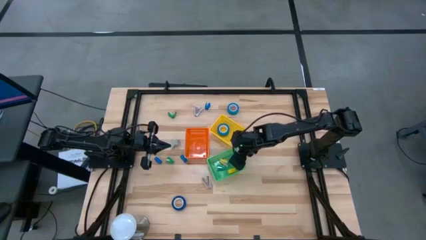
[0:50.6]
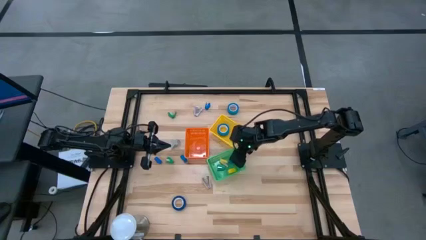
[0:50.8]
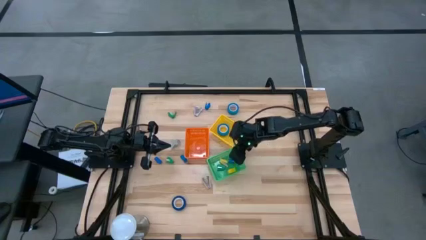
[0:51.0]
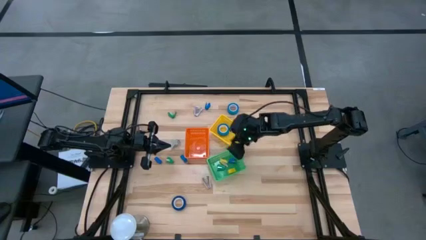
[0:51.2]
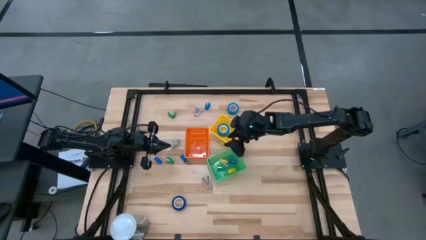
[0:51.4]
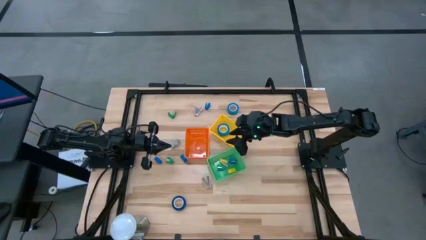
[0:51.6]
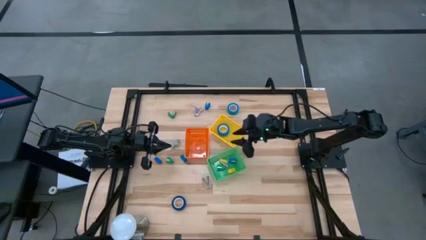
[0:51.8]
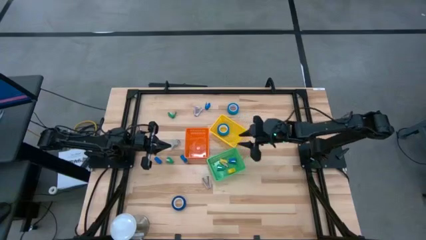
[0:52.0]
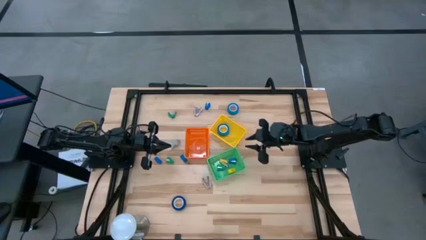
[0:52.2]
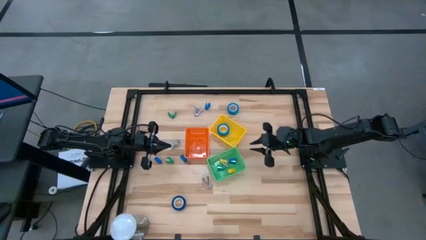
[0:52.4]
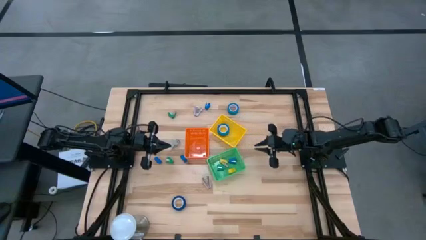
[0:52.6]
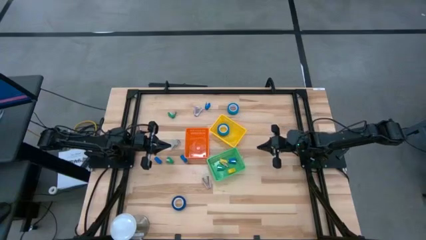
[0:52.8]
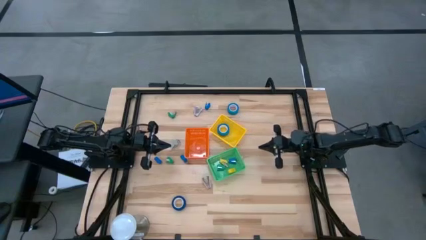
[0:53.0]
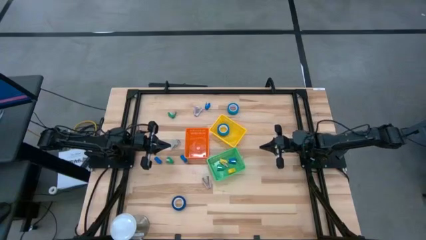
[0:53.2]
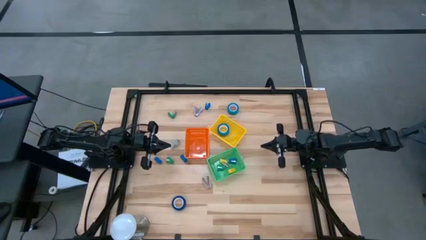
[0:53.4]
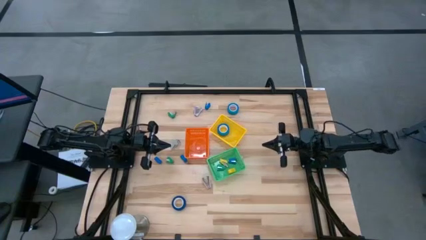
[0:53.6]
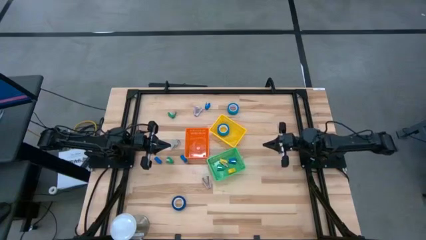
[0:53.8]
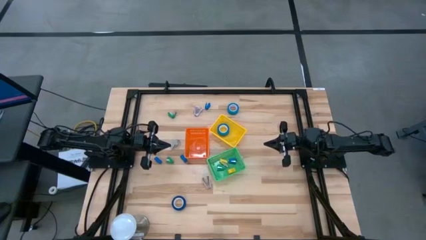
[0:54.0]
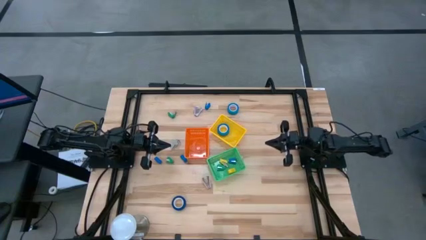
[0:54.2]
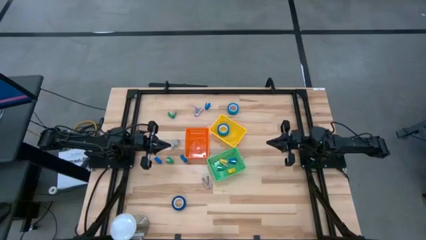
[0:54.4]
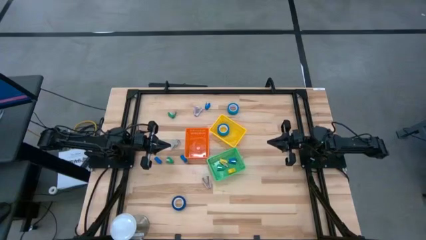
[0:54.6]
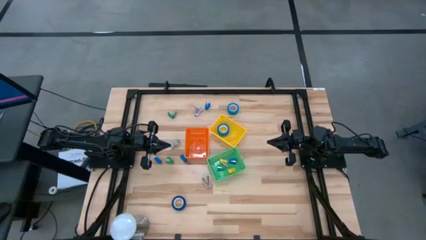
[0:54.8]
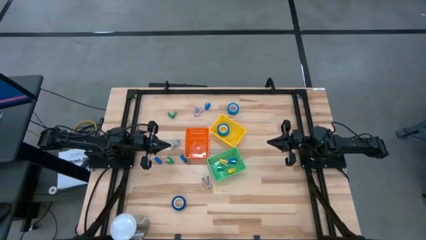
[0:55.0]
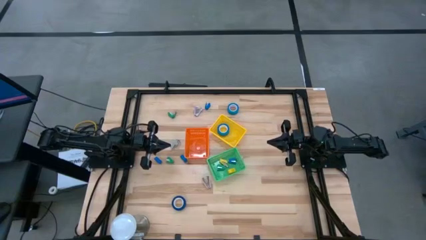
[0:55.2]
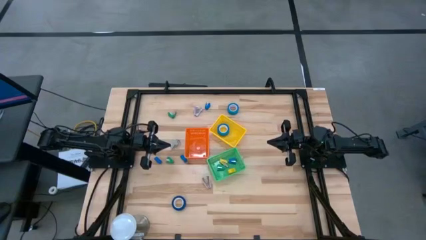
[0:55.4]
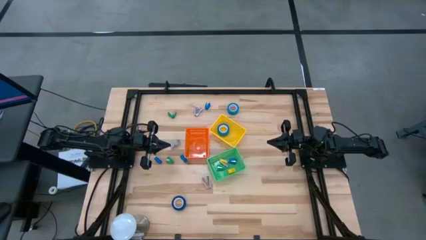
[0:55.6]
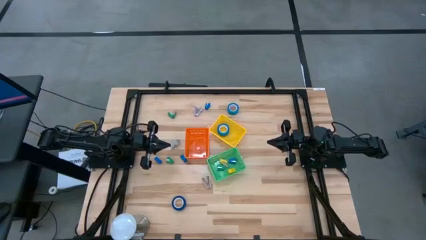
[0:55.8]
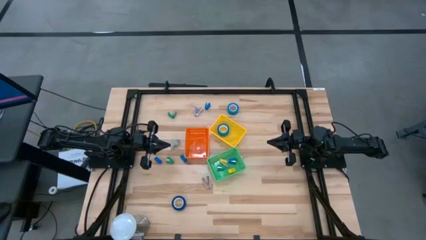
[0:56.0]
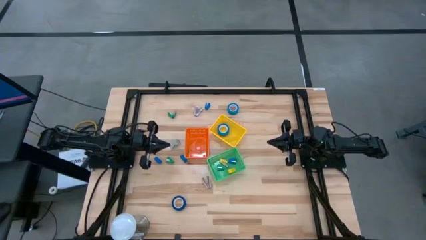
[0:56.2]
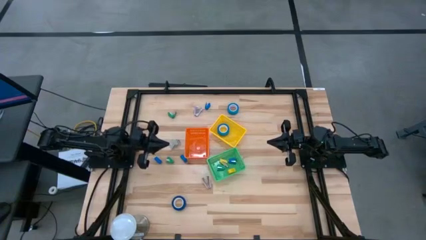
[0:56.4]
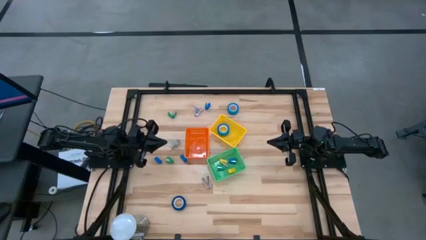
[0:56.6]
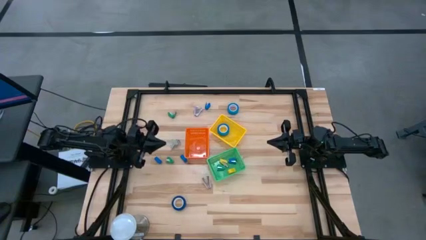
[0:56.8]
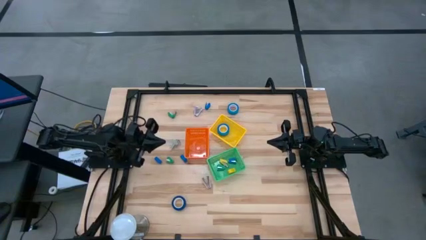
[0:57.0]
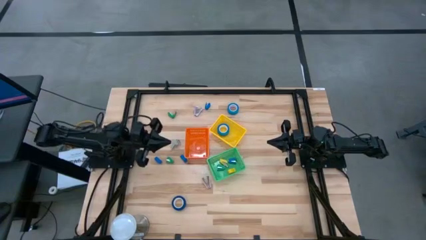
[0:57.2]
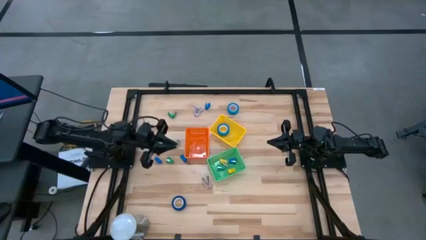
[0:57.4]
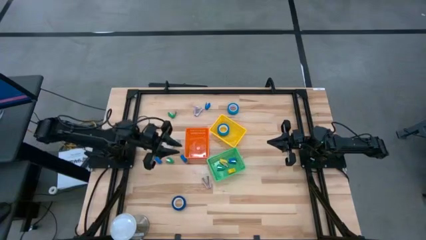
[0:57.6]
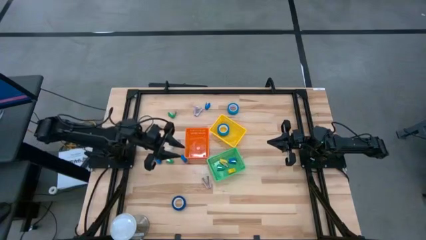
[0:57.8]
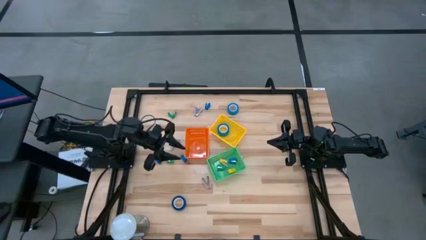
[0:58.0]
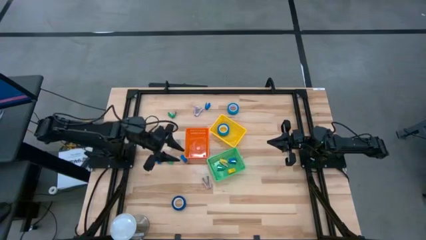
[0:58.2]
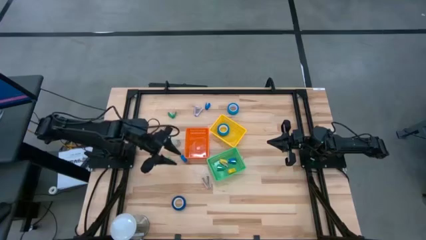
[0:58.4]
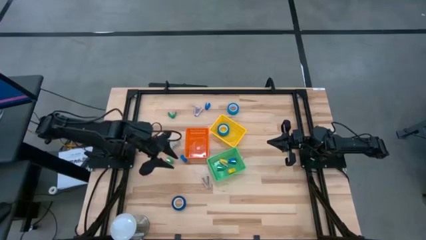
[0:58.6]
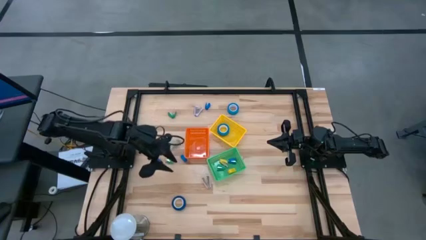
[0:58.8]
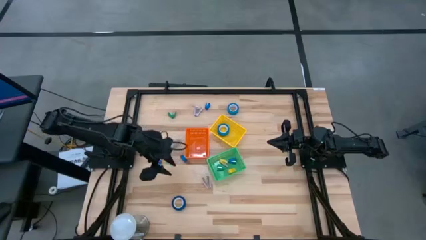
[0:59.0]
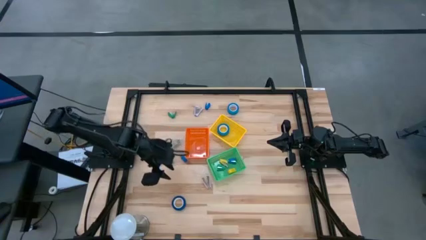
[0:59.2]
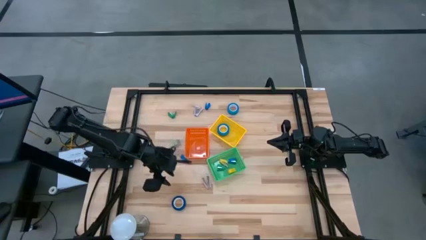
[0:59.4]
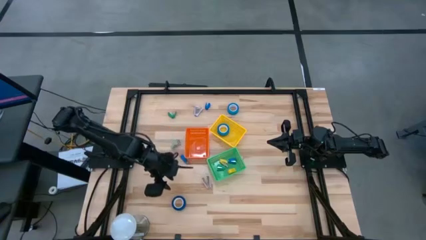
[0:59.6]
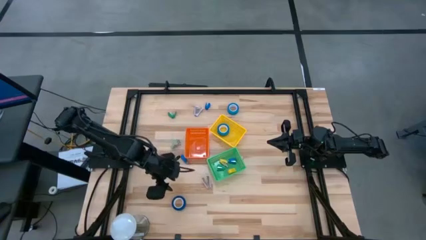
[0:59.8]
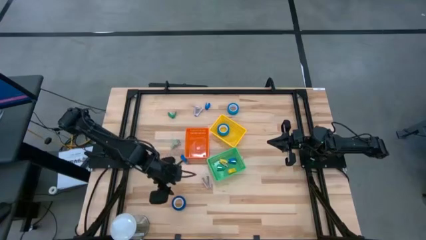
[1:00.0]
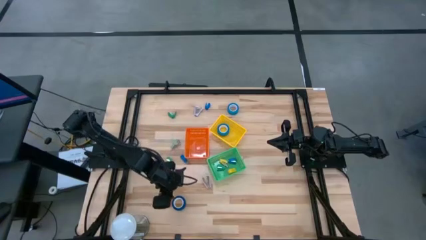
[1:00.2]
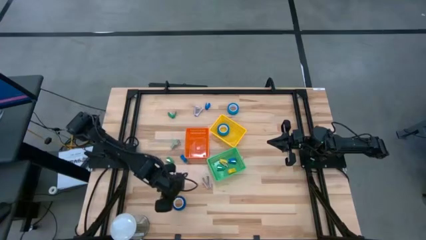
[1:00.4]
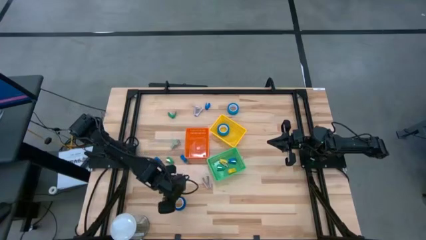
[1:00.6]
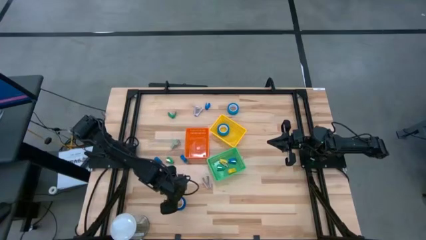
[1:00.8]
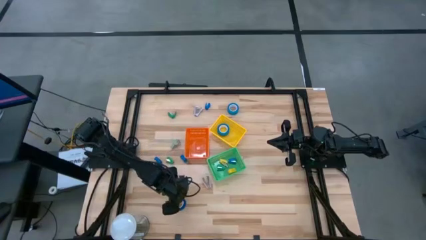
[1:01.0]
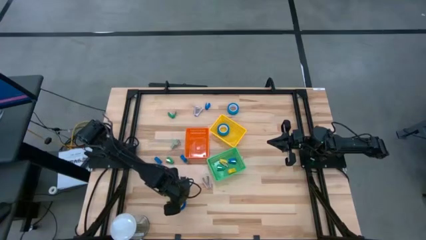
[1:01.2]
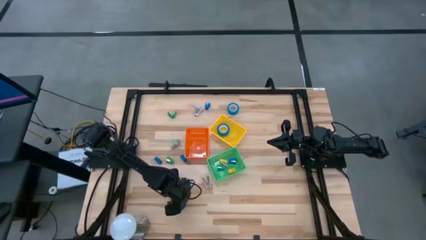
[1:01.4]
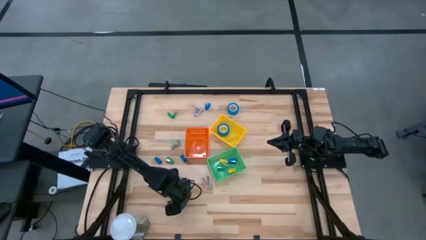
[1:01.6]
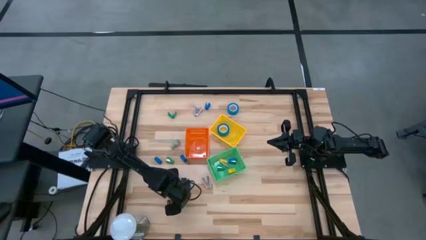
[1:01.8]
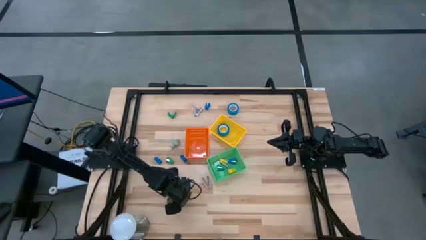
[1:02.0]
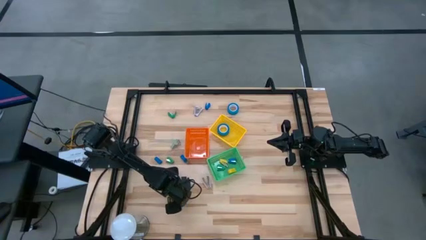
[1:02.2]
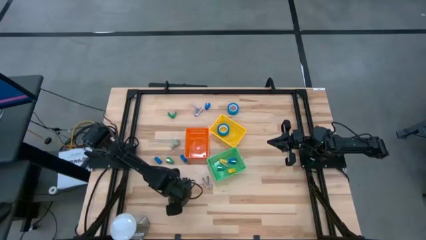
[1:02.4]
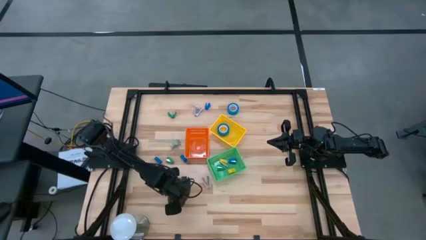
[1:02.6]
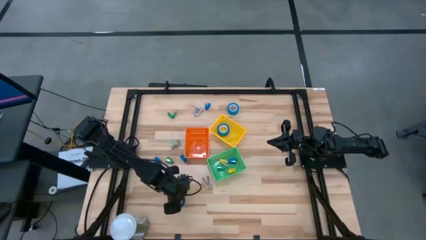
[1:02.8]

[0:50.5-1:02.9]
Task: Pick and place Stapler, Stapler remover, tape
Put the blue tape into the yellow bin
